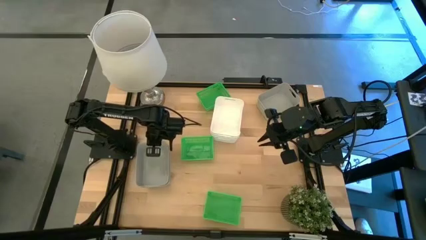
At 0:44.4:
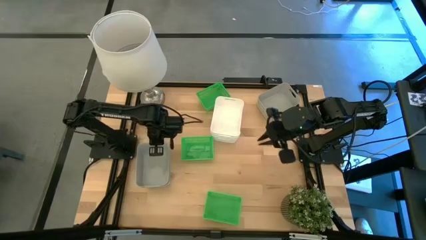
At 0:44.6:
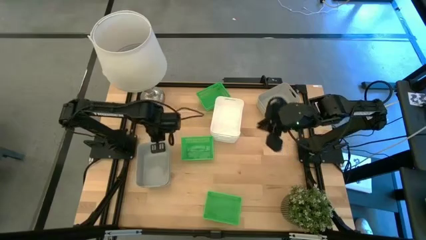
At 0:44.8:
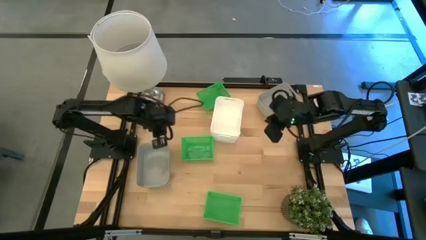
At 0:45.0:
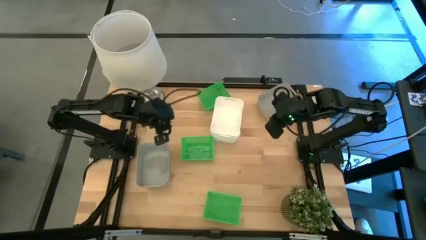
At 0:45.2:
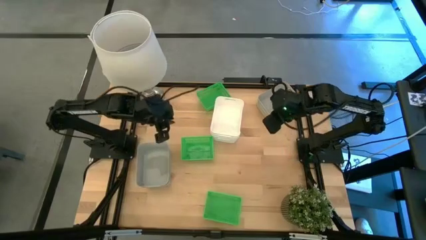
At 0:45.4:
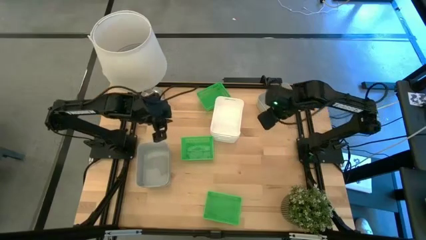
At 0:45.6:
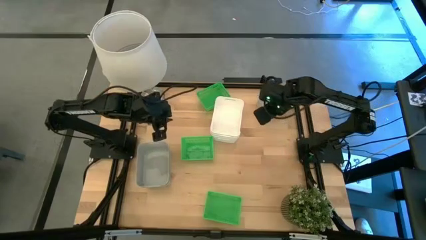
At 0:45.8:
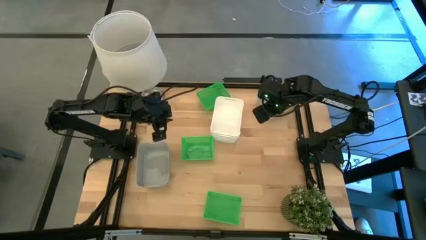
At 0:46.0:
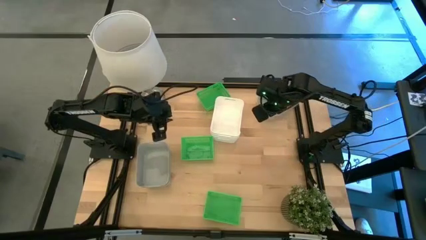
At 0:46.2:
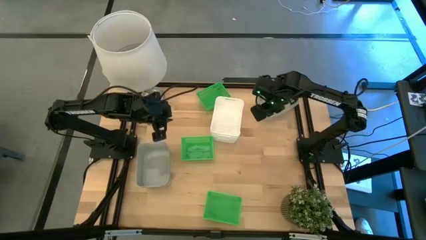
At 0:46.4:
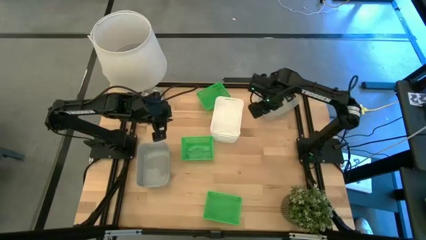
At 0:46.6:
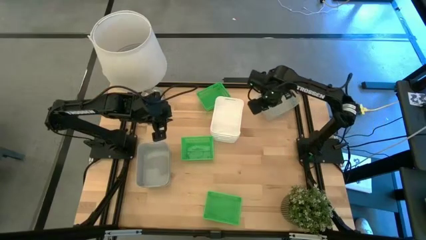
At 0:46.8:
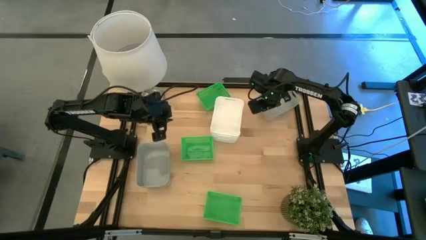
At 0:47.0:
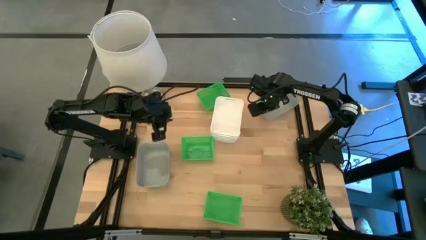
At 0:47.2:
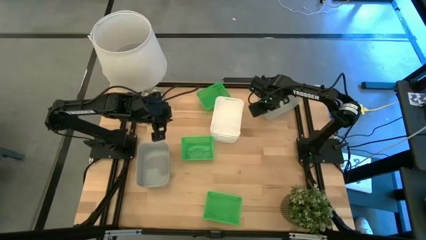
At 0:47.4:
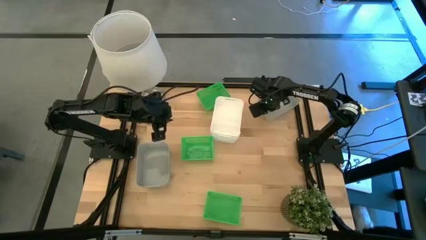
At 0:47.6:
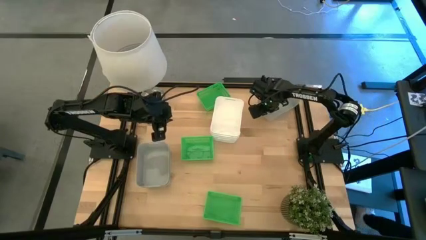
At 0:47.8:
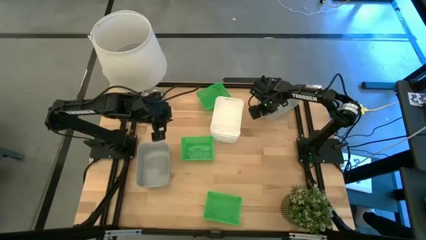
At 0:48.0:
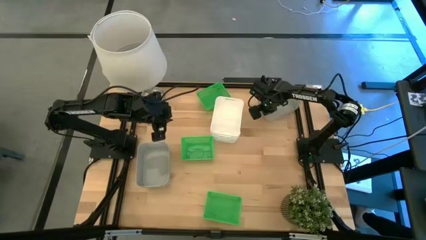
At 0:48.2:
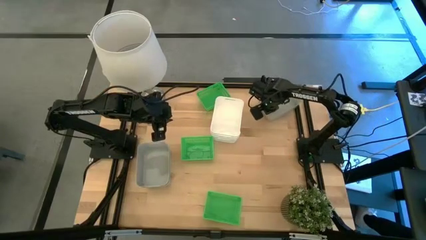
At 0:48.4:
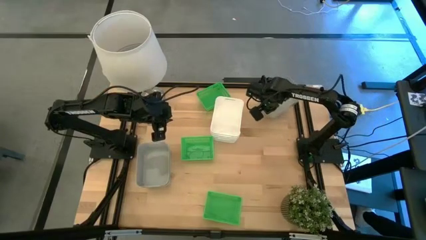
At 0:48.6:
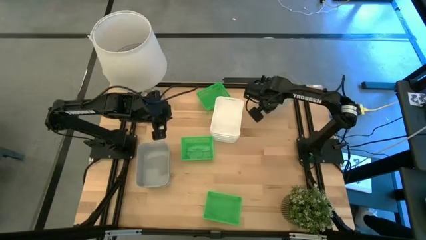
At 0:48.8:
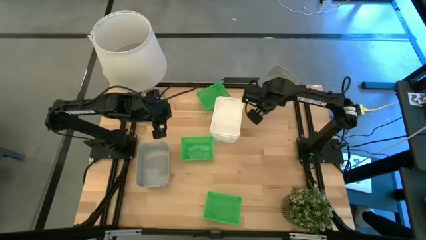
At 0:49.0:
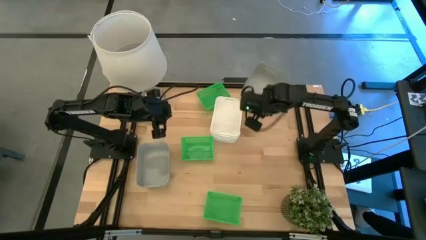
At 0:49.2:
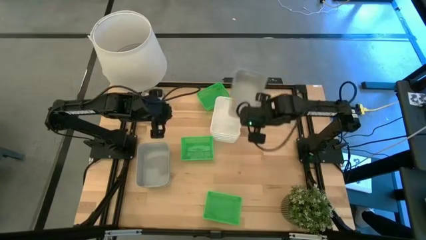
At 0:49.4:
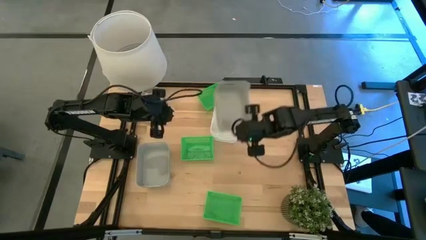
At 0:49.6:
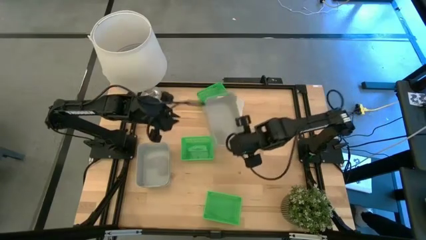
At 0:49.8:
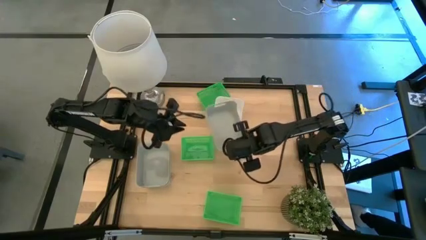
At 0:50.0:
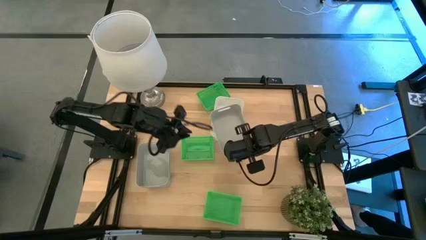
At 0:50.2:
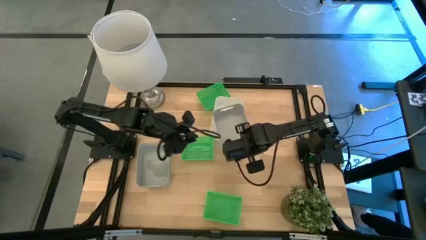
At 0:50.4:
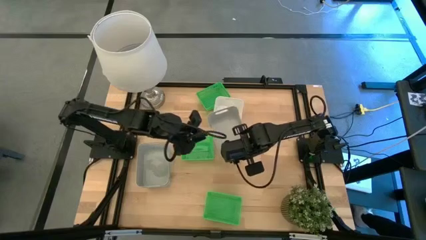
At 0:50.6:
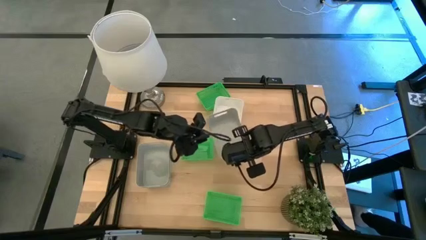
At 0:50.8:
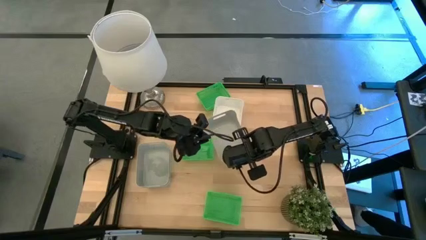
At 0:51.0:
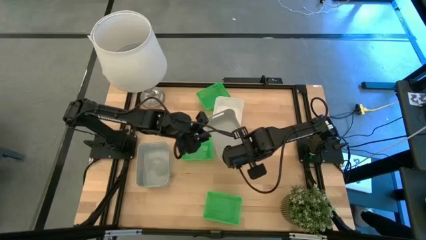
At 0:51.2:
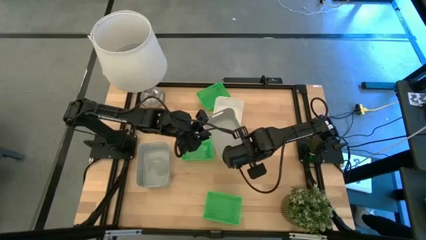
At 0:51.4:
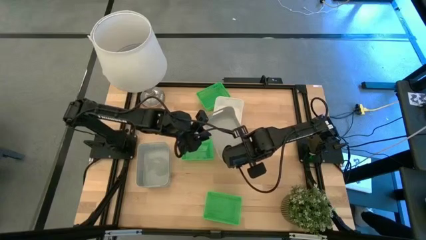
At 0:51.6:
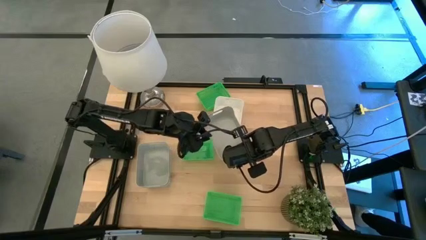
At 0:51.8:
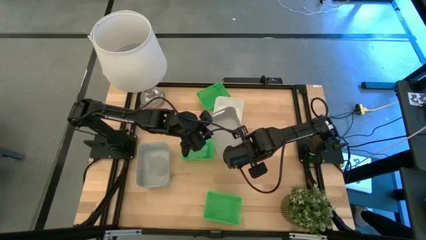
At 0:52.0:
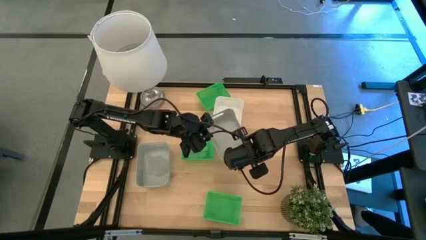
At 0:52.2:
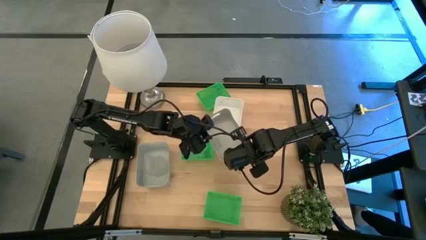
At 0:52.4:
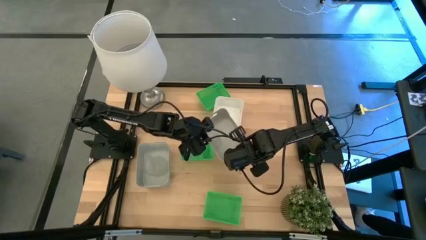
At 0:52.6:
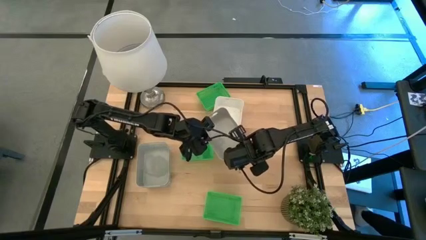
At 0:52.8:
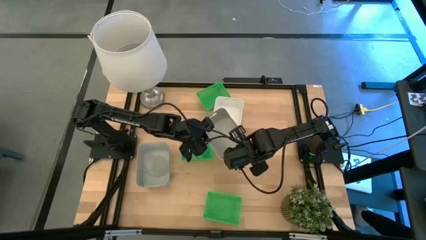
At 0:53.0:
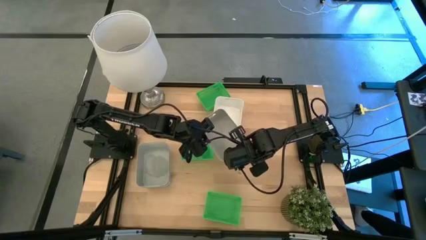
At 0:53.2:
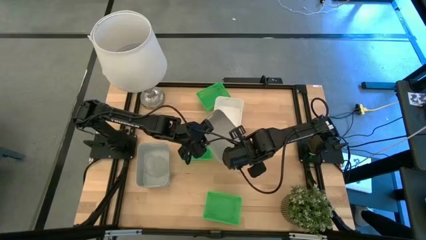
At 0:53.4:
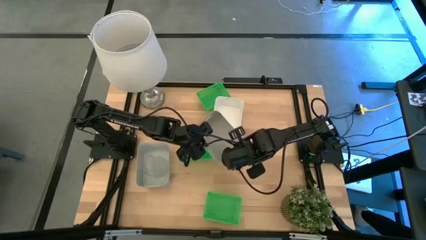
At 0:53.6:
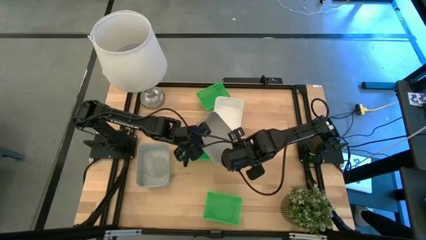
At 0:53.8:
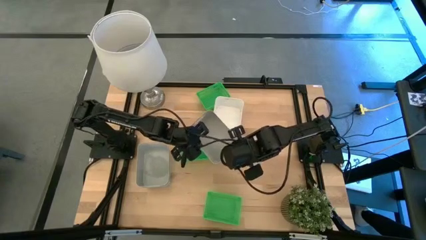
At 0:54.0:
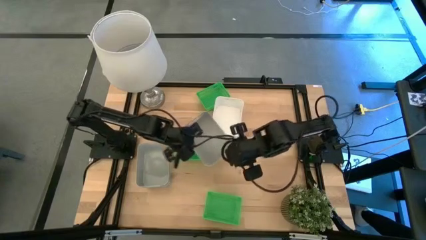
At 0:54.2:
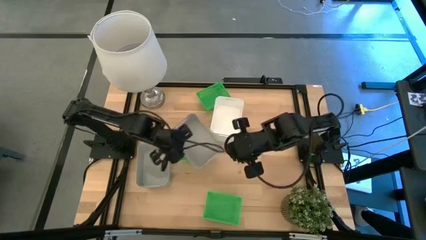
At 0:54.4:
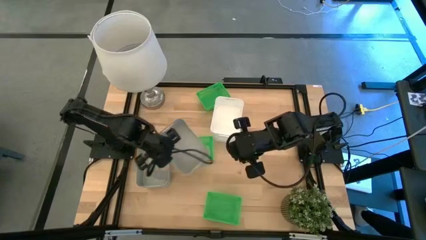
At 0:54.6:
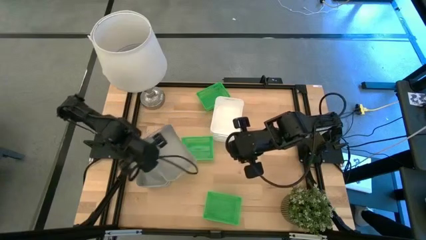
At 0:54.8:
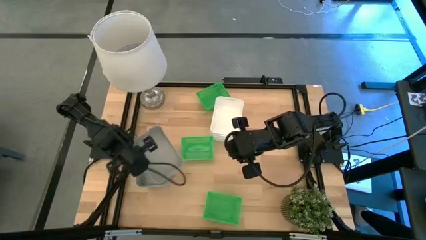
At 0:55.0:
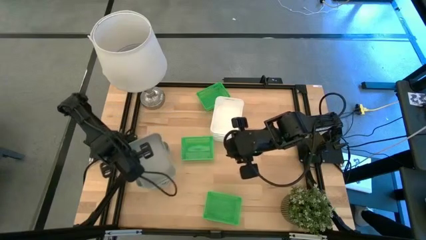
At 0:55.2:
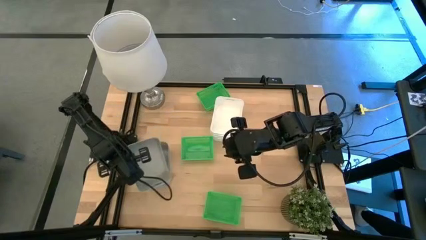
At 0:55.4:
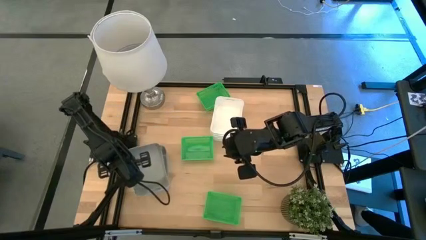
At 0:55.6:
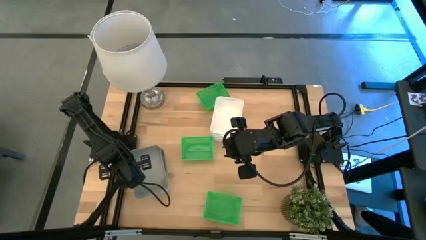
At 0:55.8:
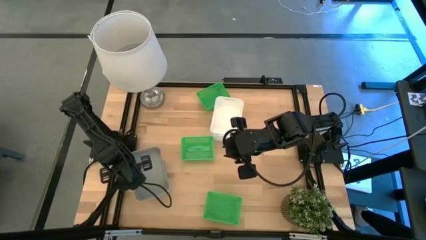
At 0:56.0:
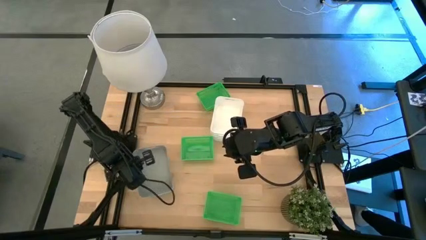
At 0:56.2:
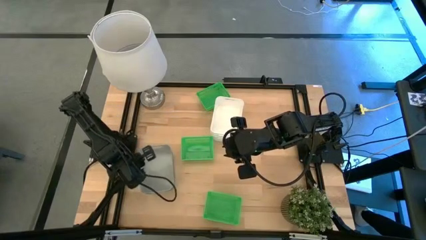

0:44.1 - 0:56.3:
Stack the top gray bin on top of the bottom gray bin

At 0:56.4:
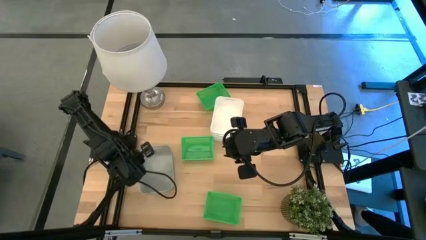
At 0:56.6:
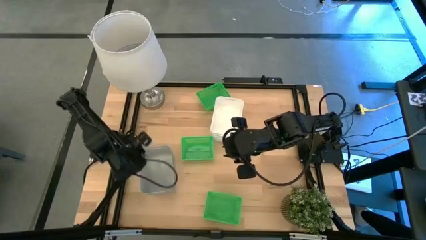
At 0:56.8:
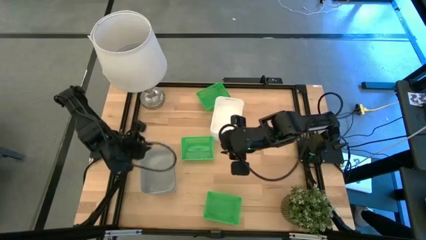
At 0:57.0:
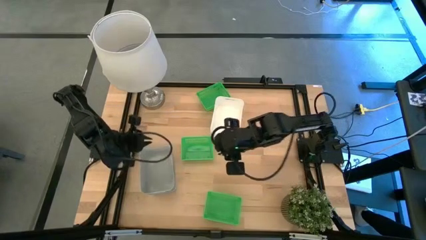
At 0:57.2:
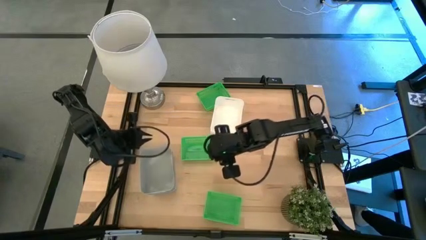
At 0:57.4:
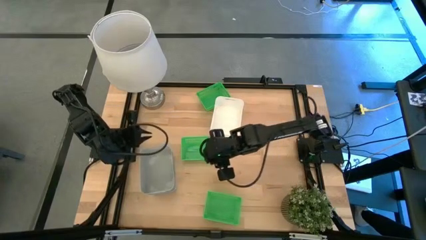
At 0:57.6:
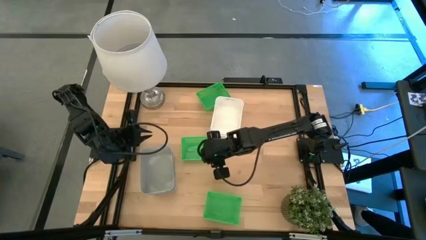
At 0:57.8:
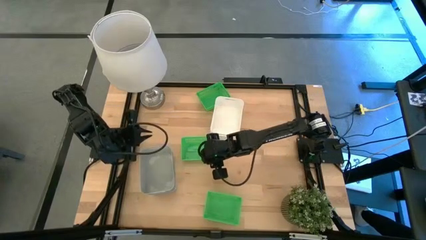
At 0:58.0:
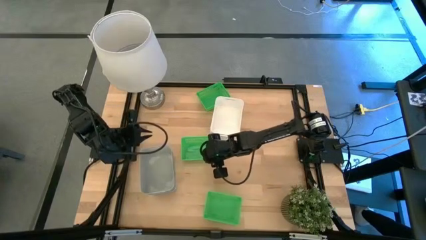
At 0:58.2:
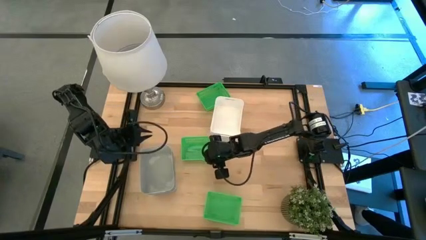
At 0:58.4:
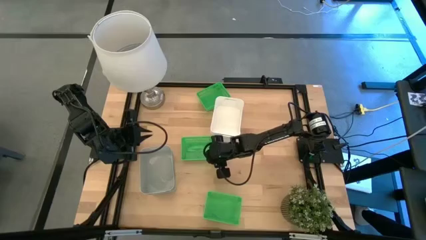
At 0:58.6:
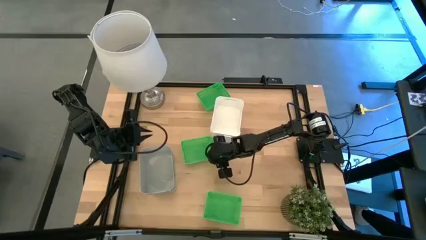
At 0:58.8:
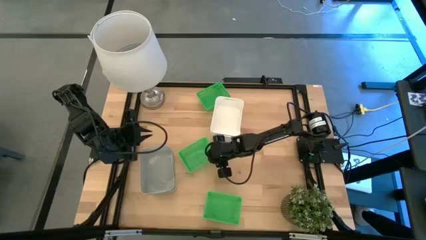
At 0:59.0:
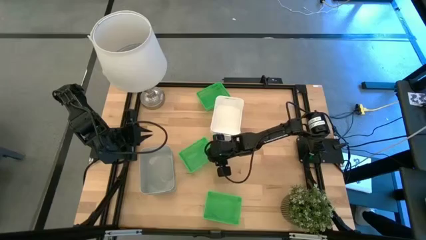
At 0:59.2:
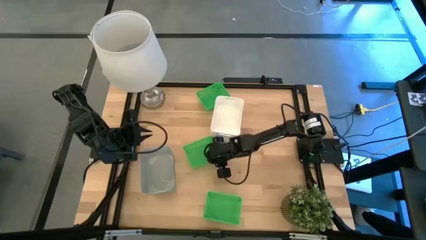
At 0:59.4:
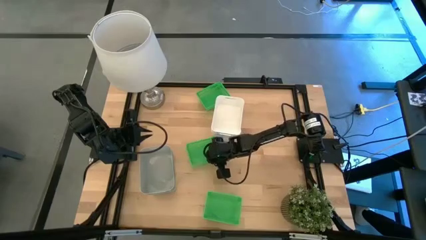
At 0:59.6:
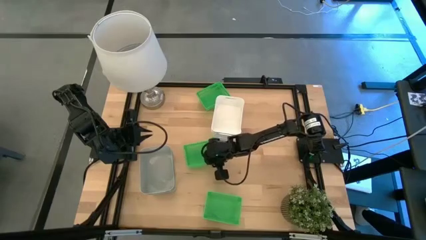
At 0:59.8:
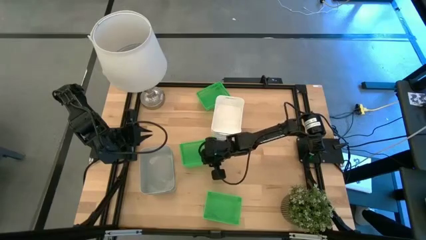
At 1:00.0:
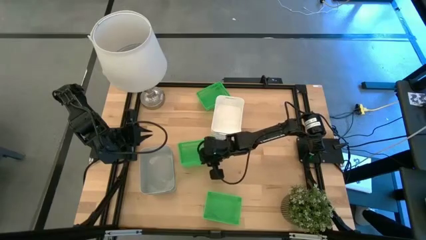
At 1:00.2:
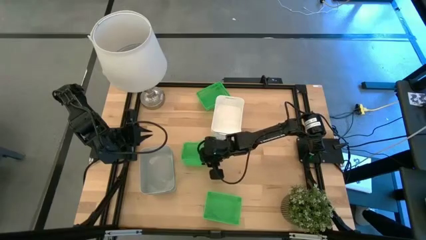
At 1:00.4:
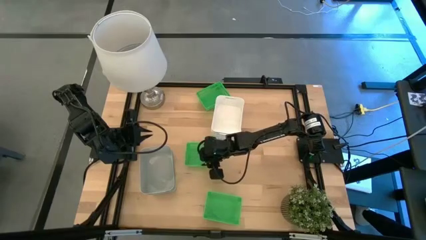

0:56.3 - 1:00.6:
Adjust the middle green bin on the table

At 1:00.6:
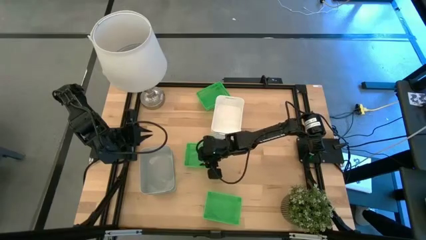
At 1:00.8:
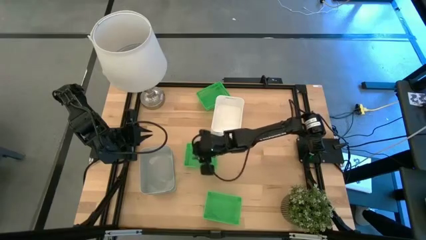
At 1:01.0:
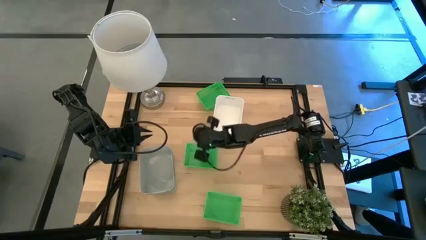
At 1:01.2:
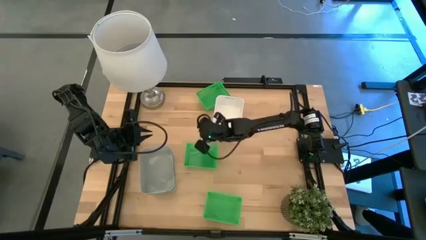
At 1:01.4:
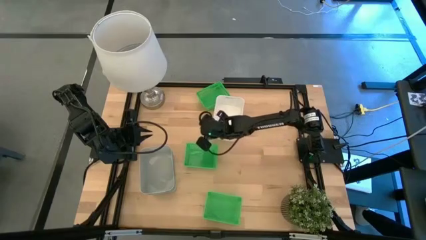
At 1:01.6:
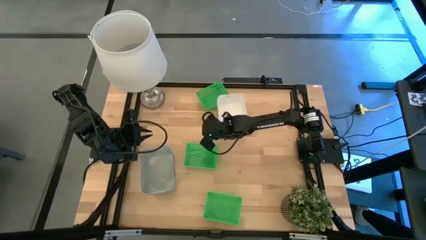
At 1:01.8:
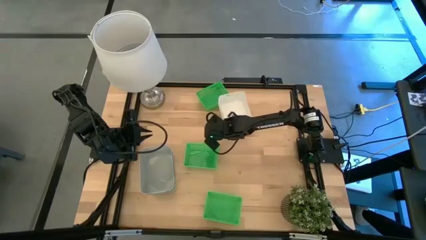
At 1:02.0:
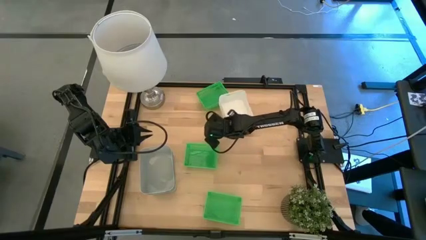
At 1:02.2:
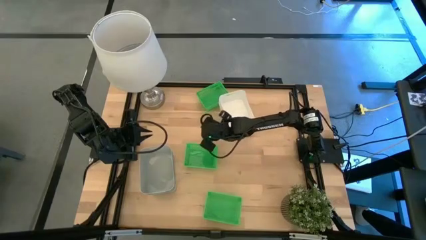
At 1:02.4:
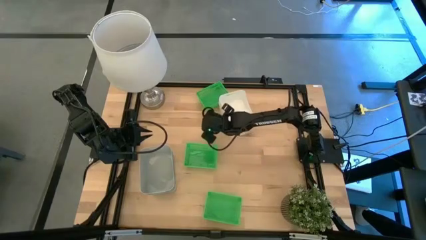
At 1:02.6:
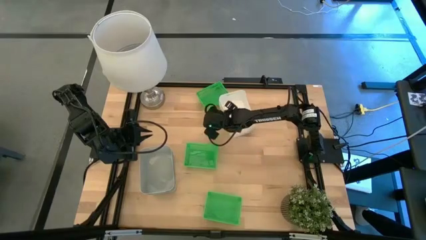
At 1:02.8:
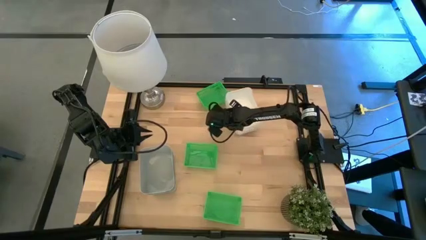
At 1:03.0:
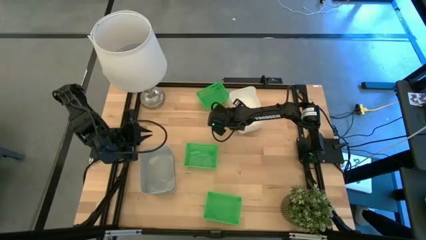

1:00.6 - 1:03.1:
Adjust the stacked white bins
